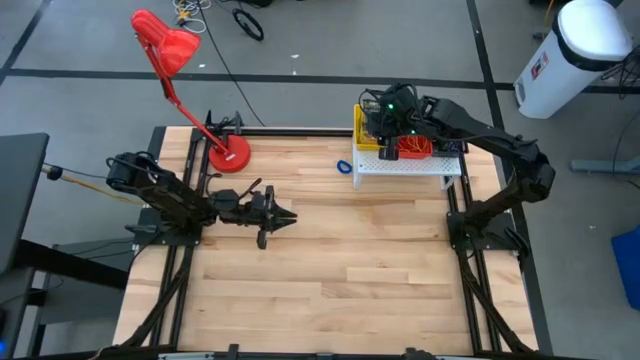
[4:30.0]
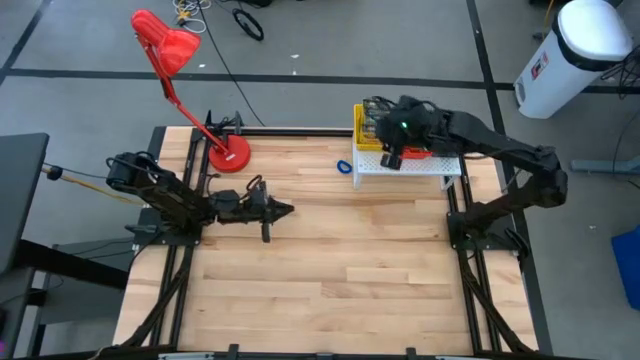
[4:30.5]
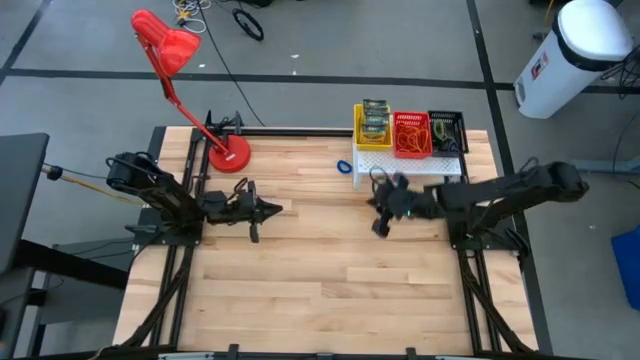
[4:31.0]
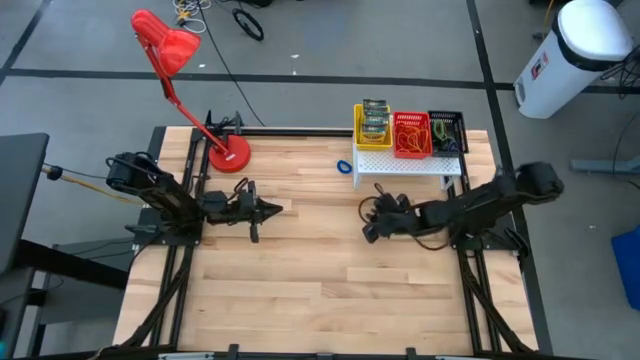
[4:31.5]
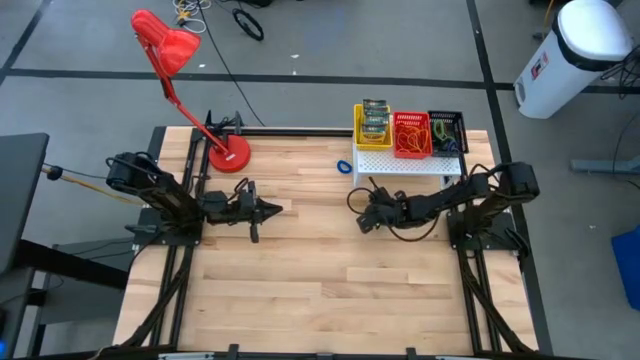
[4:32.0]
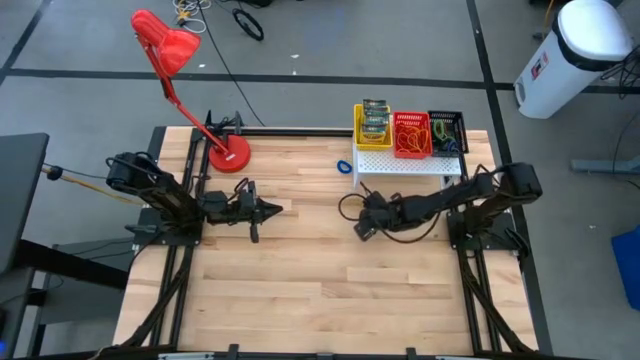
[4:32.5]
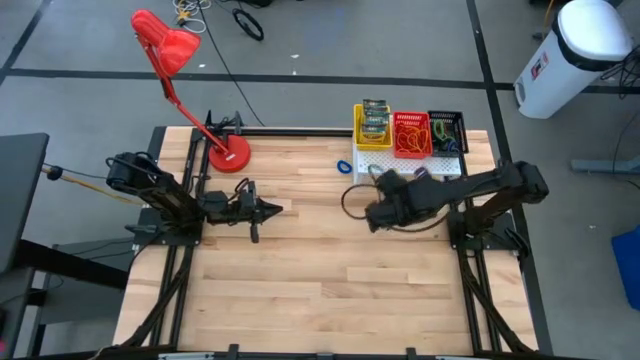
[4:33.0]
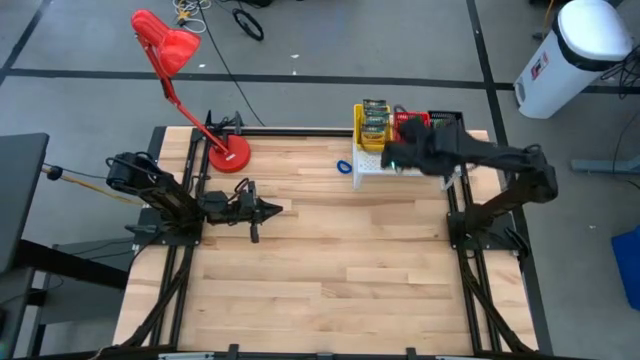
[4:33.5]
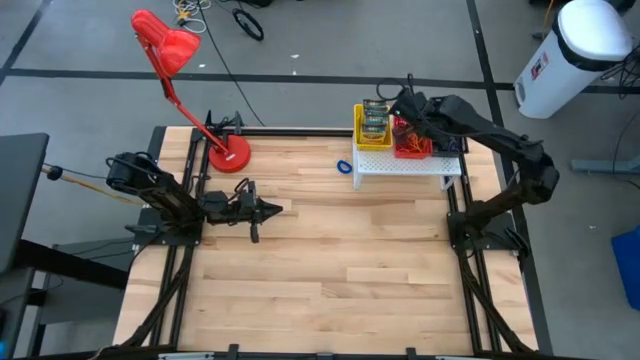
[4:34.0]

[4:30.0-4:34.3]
Task: Pick & Place Office Desk Supplies
Put the yellow rubber band on the red basket

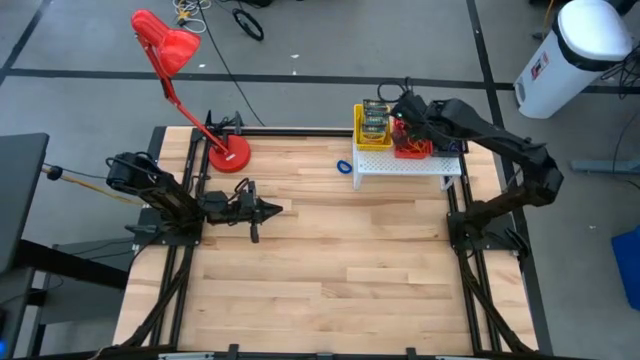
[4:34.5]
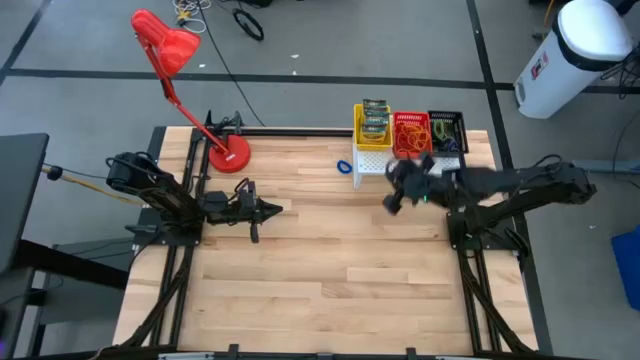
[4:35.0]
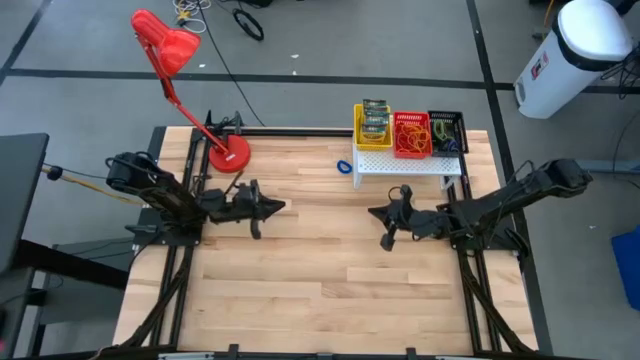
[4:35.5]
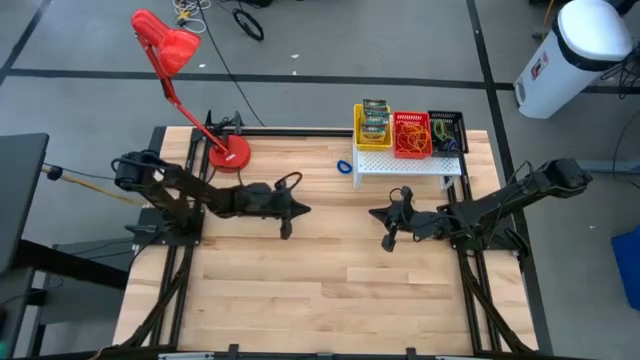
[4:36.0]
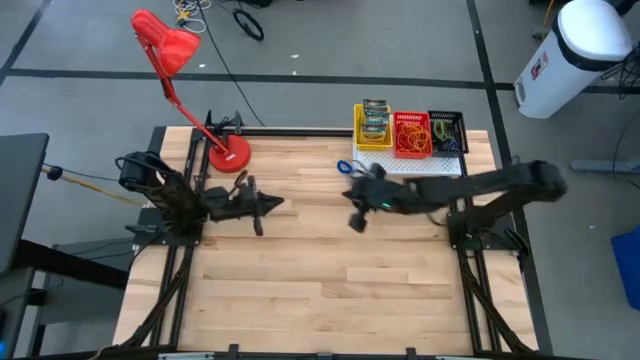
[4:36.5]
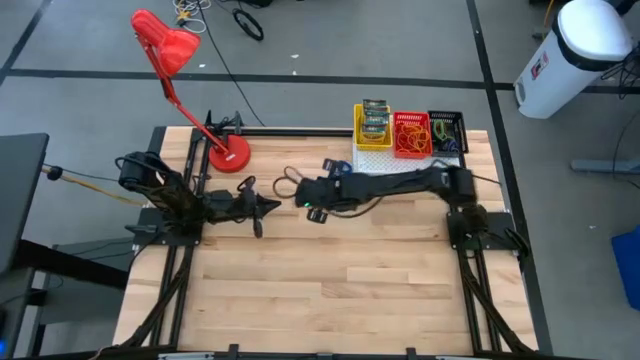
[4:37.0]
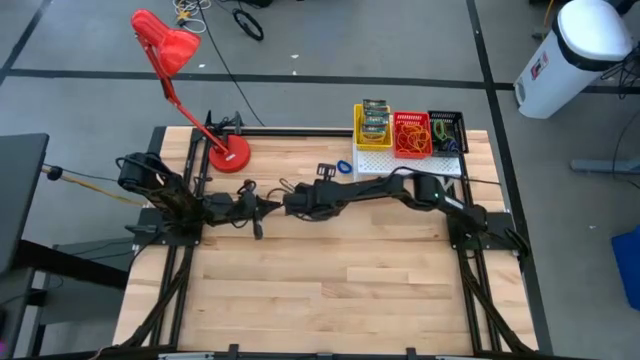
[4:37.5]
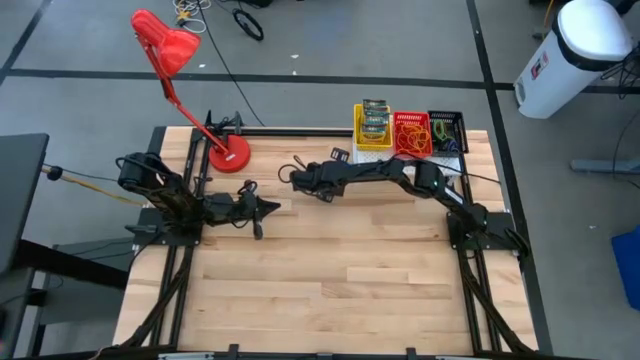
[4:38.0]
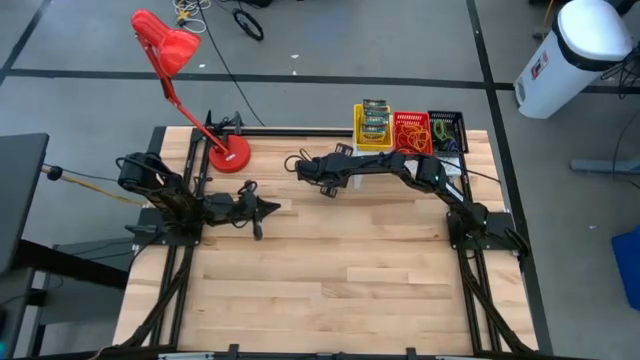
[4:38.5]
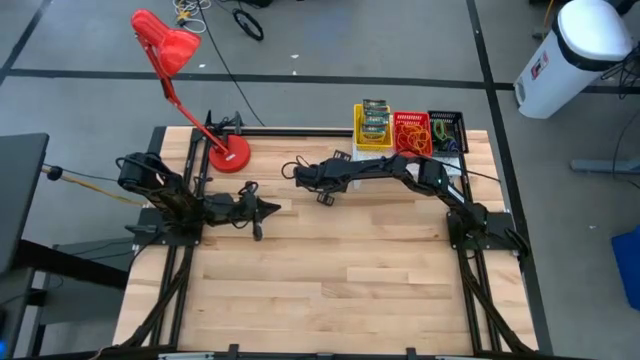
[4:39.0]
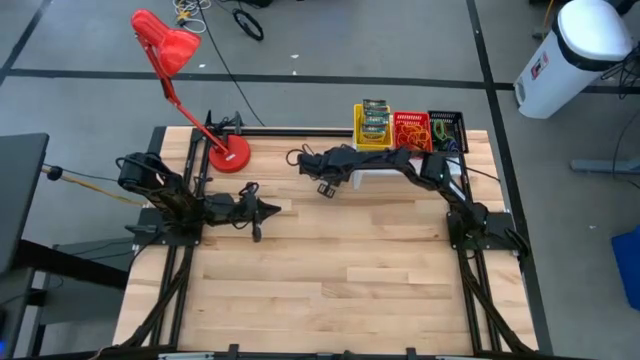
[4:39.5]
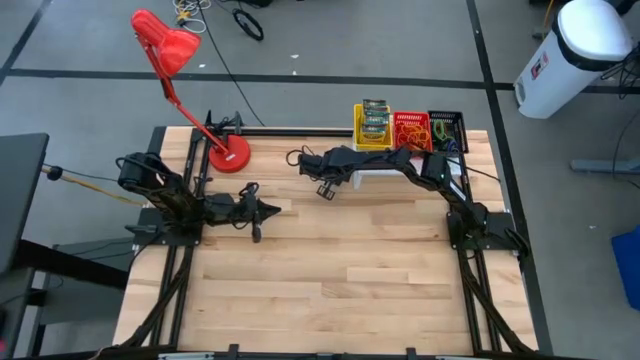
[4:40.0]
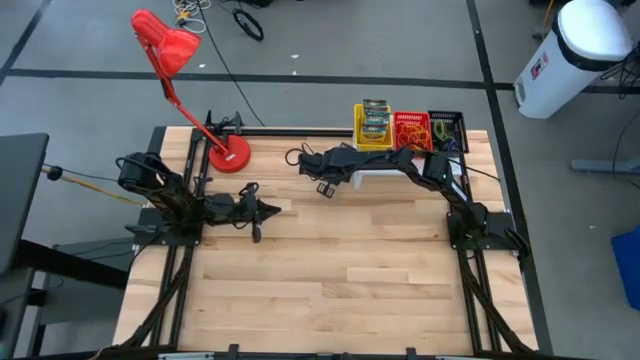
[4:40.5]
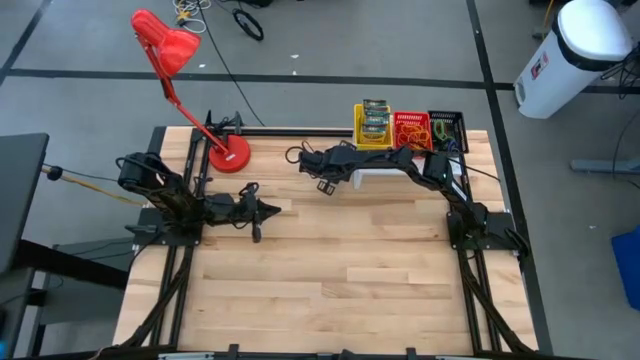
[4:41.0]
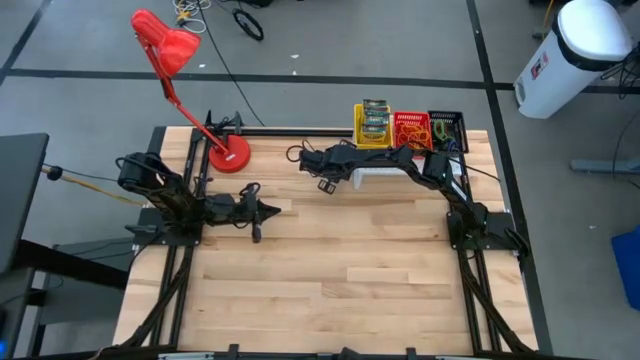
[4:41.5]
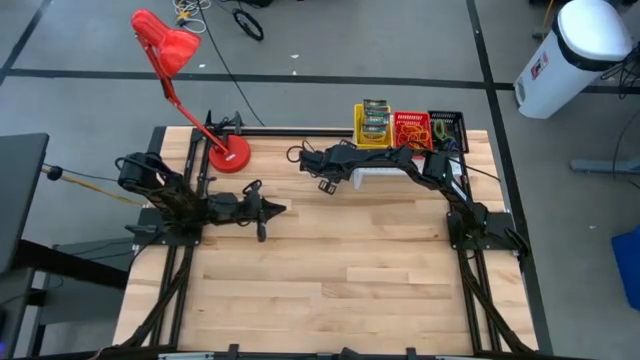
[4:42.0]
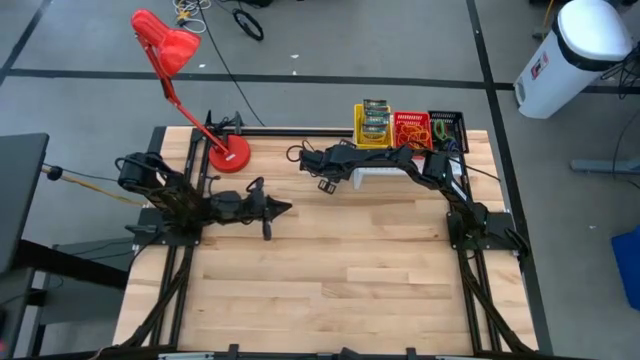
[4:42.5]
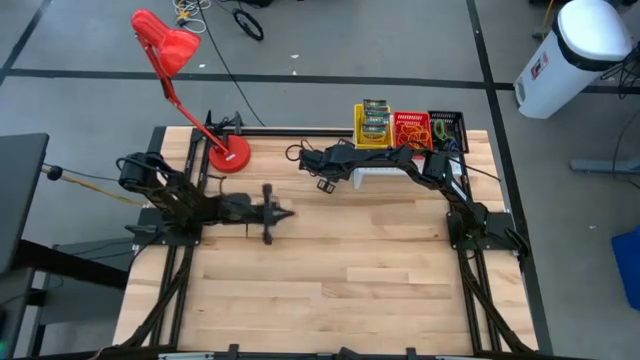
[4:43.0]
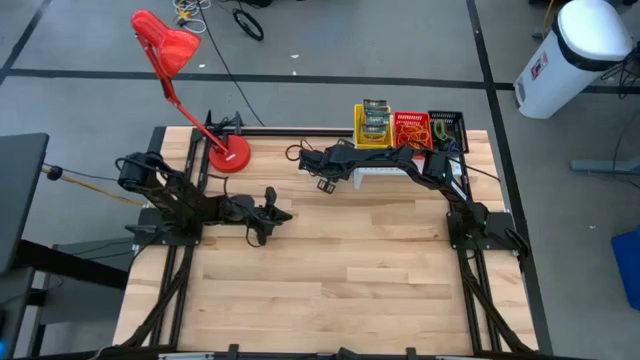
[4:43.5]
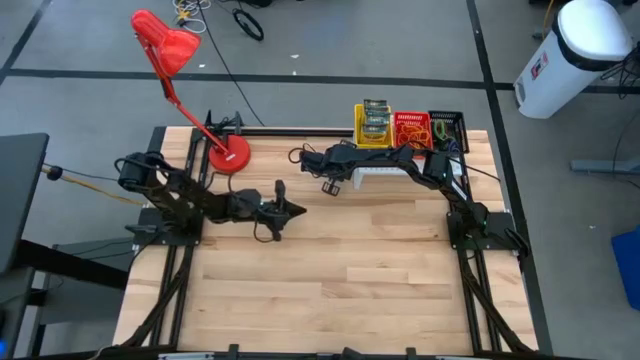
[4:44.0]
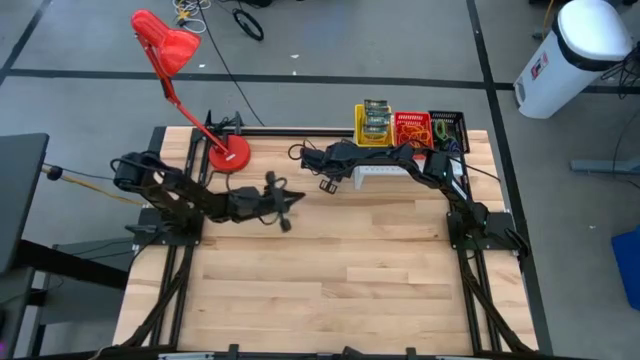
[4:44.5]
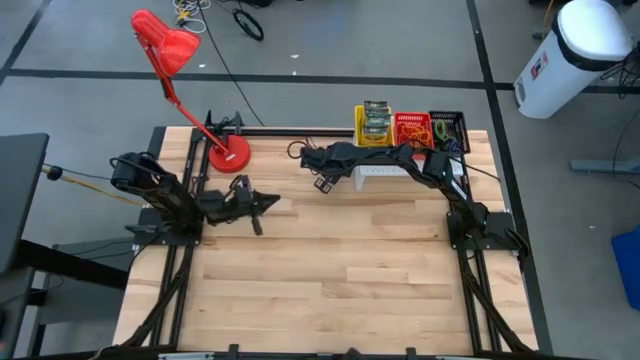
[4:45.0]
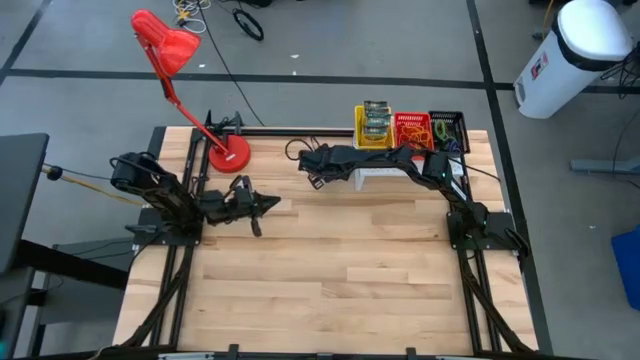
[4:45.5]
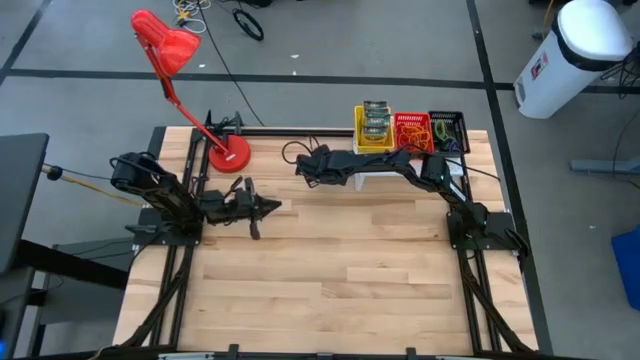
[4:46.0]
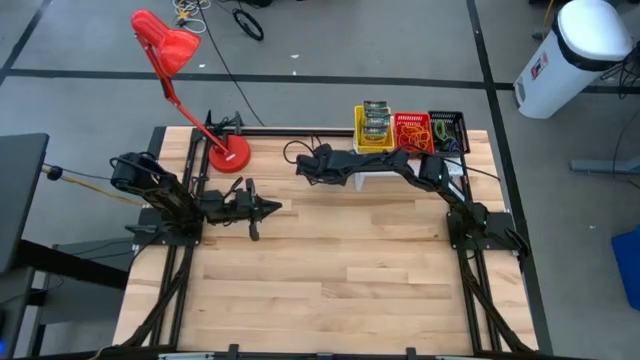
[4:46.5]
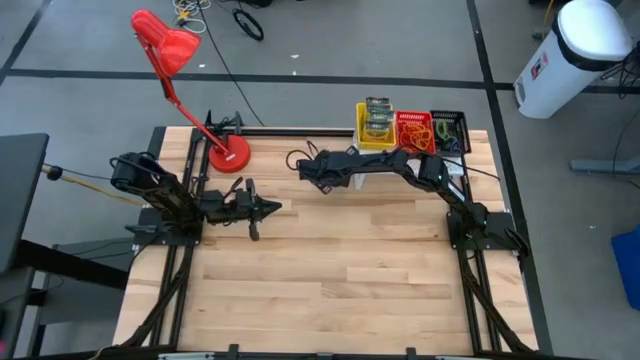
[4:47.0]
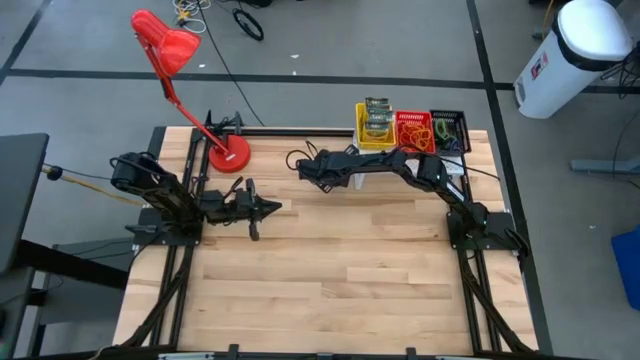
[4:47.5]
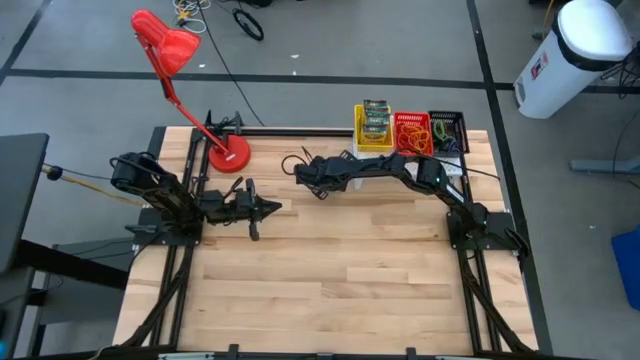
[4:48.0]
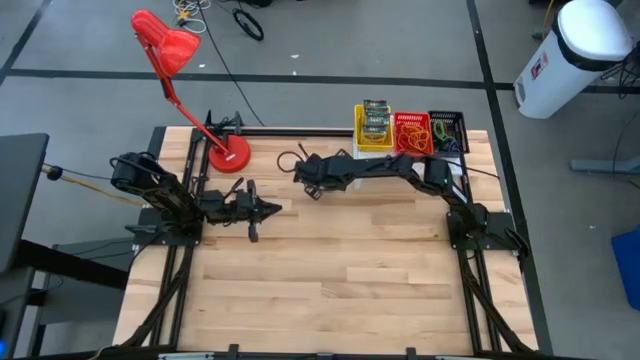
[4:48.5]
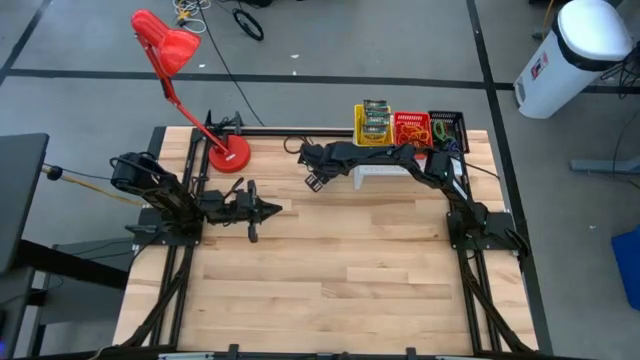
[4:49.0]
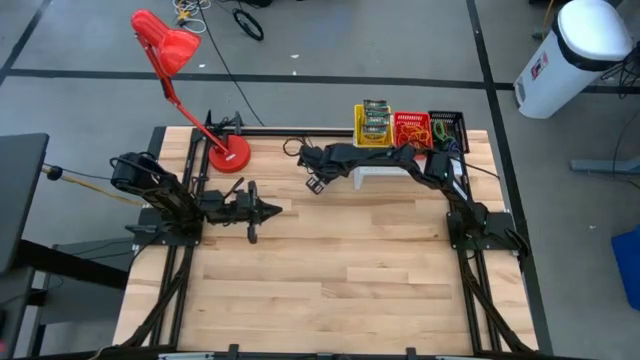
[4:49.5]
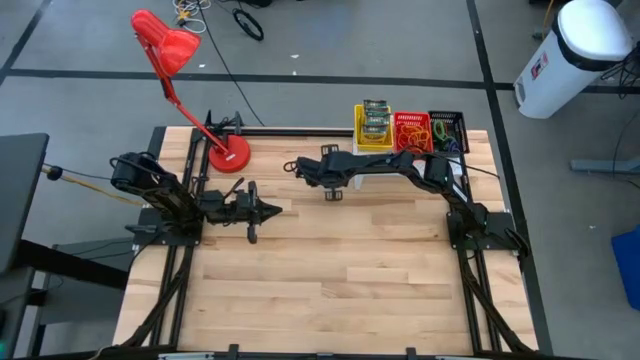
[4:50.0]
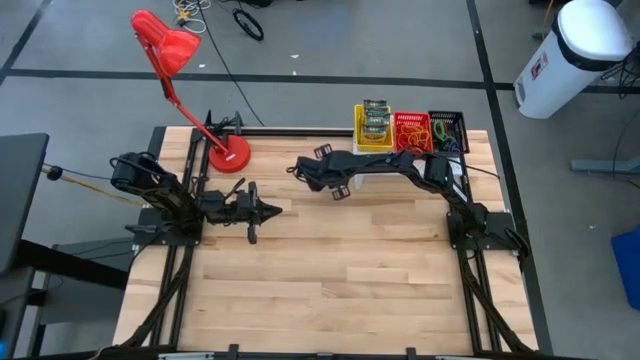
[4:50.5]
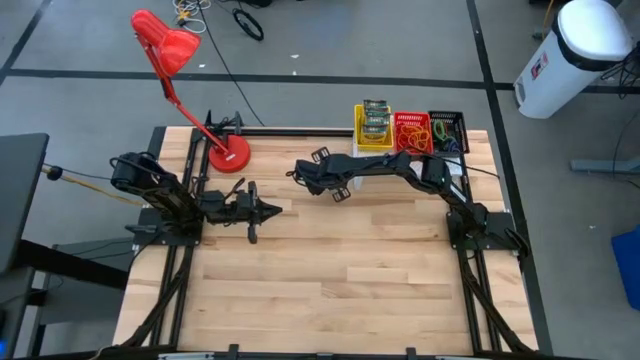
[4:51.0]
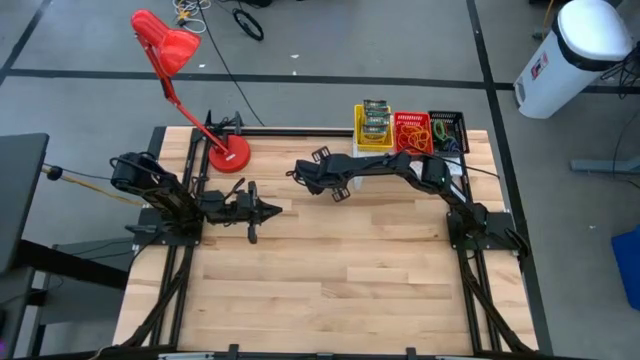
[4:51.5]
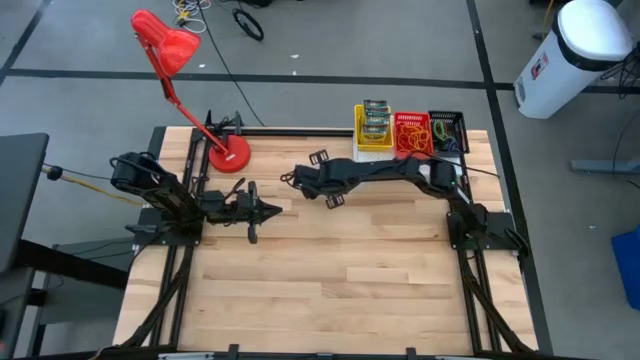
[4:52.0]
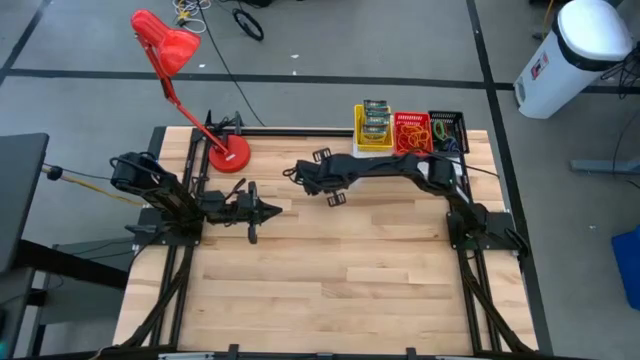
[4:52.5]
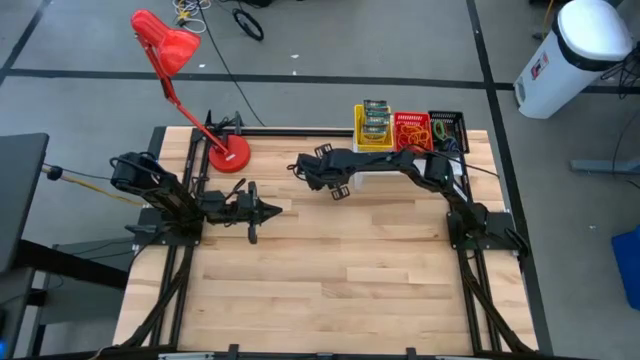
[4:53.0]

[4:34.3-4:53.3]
Put the blue spring keychain on the black basket
